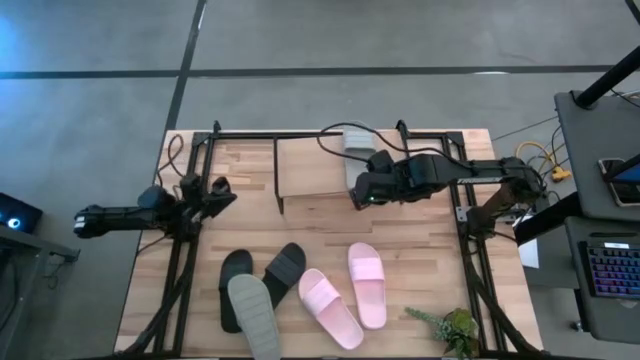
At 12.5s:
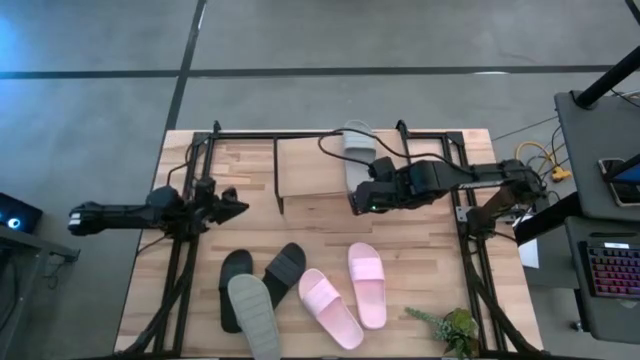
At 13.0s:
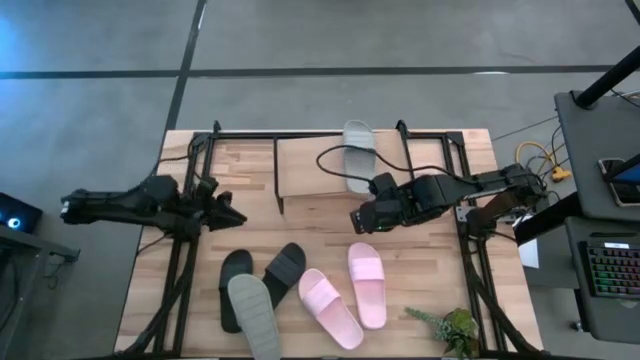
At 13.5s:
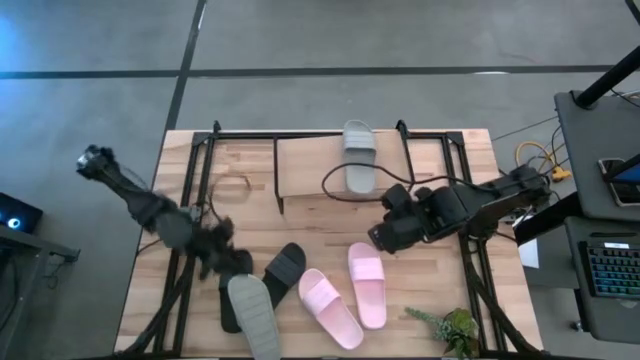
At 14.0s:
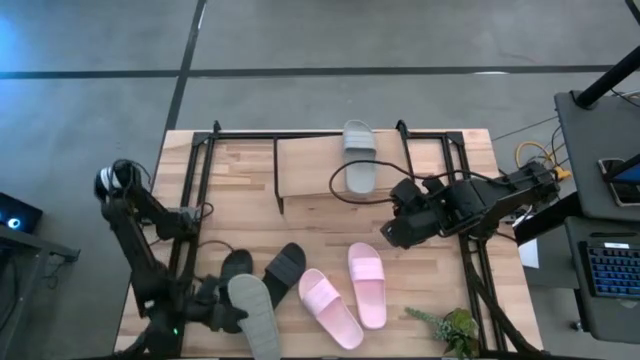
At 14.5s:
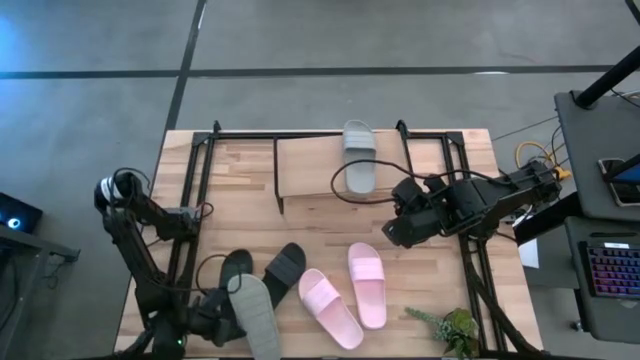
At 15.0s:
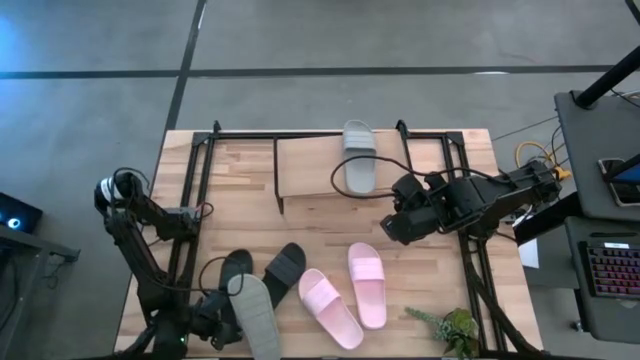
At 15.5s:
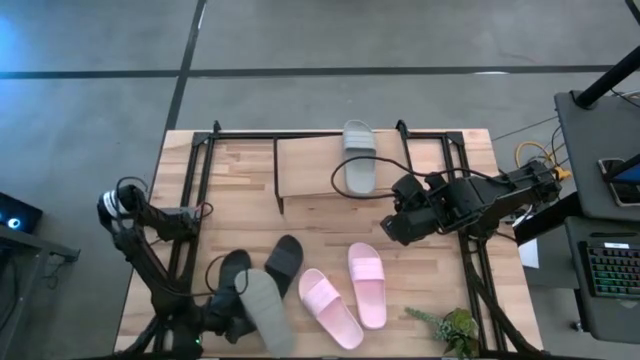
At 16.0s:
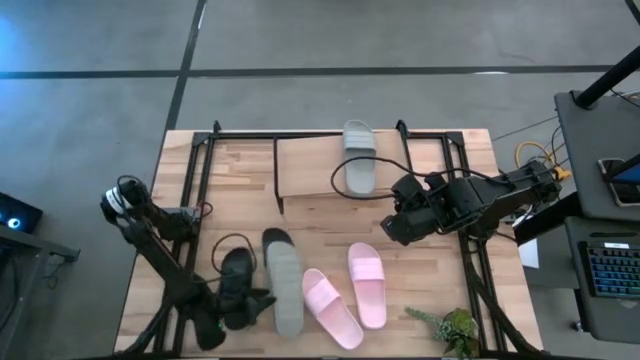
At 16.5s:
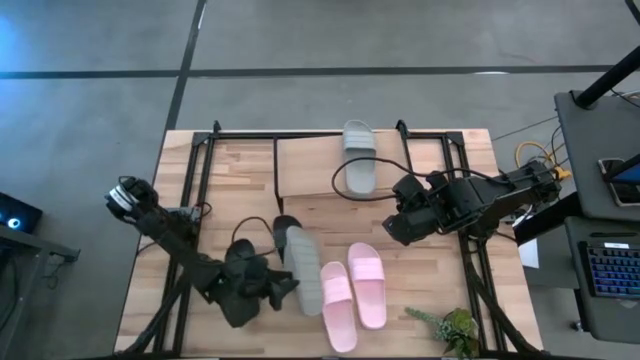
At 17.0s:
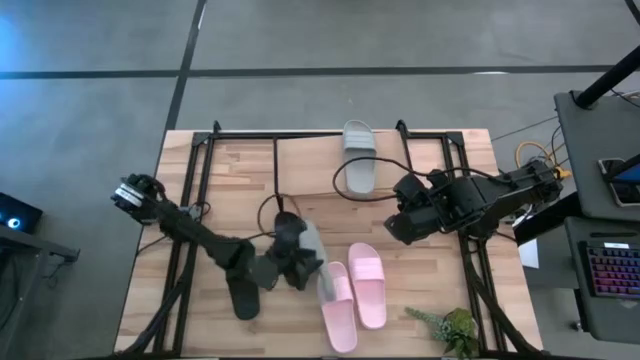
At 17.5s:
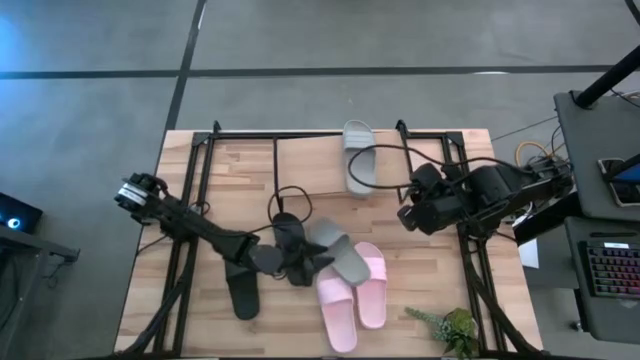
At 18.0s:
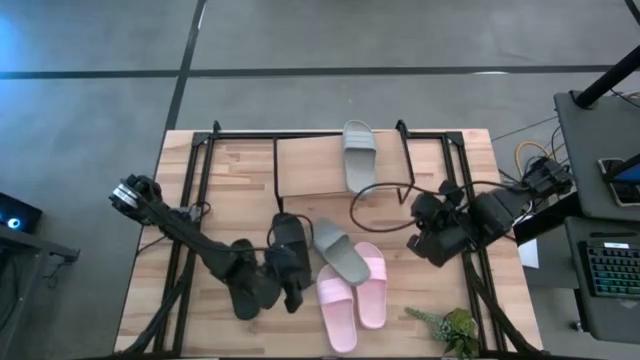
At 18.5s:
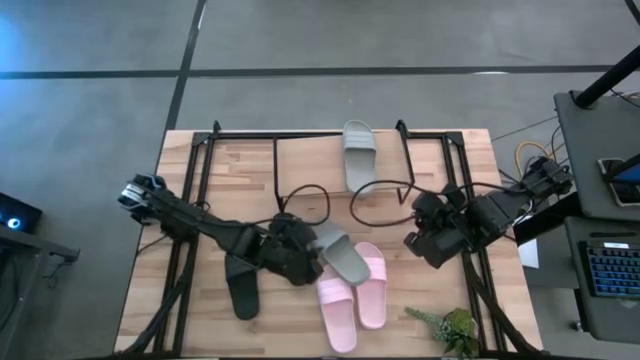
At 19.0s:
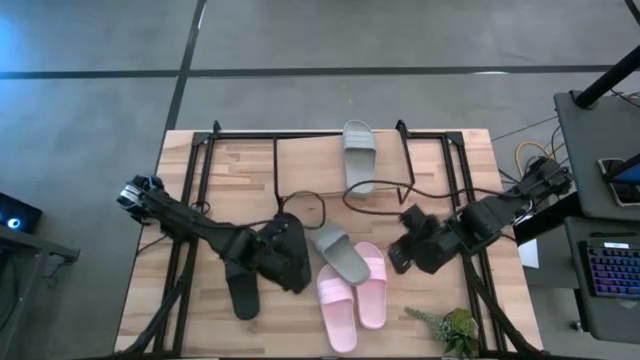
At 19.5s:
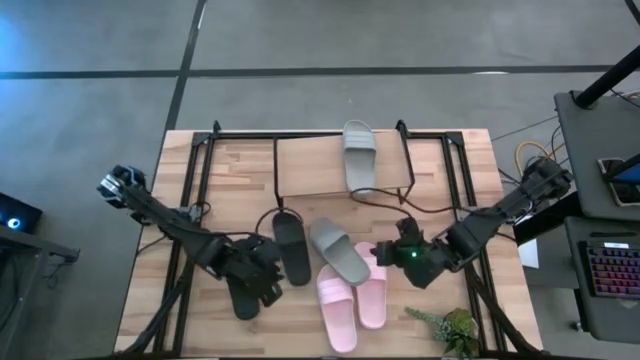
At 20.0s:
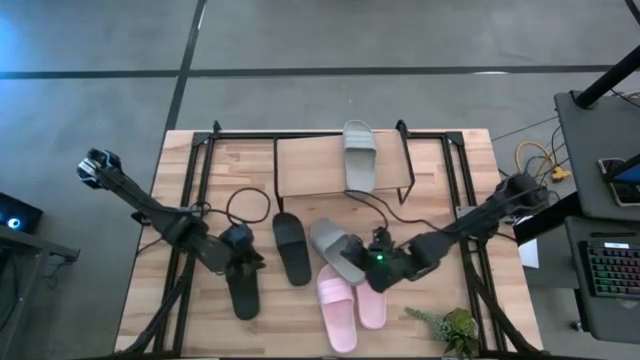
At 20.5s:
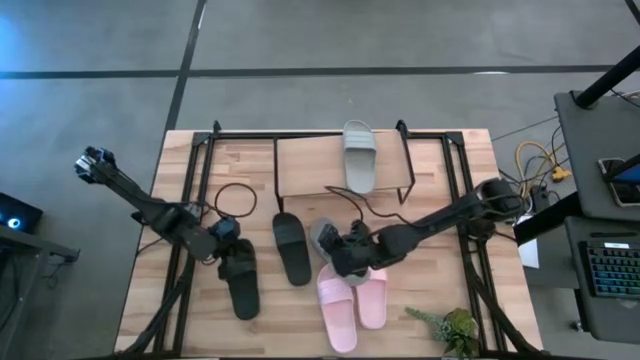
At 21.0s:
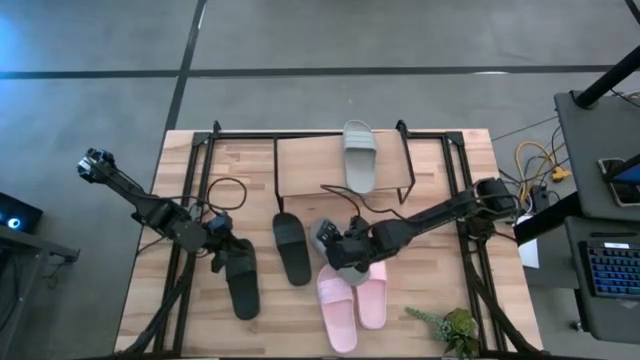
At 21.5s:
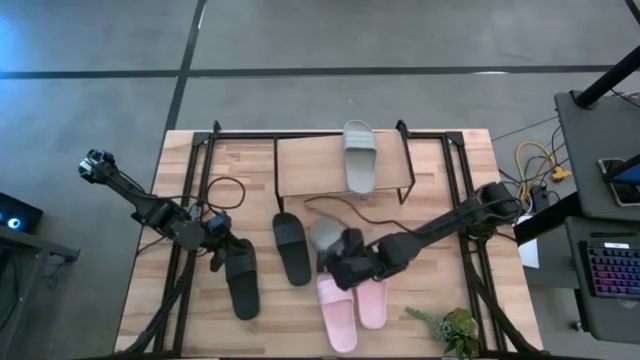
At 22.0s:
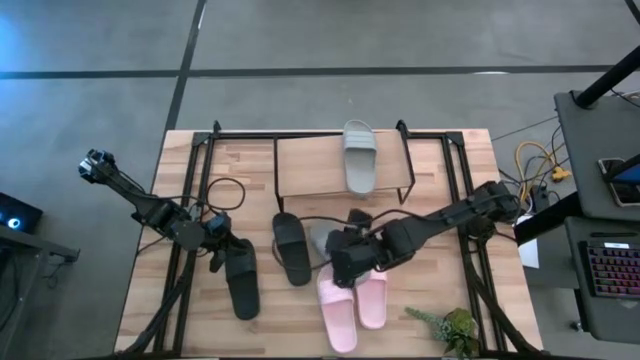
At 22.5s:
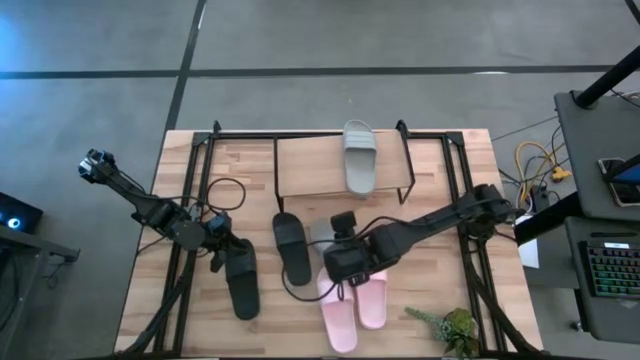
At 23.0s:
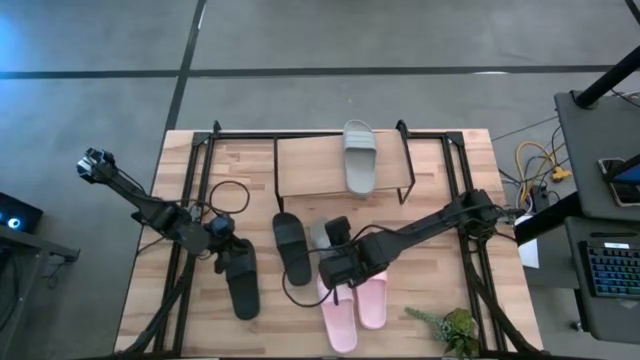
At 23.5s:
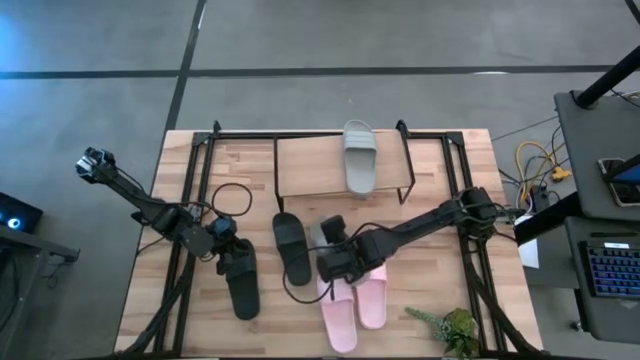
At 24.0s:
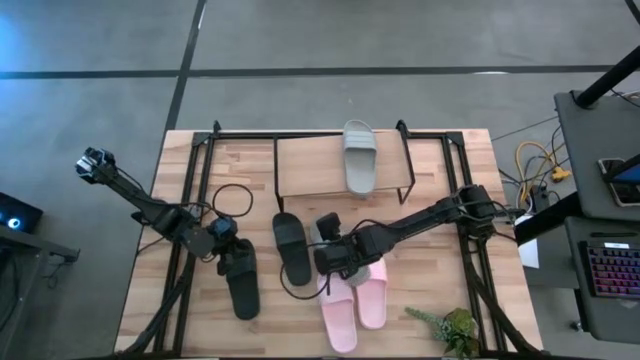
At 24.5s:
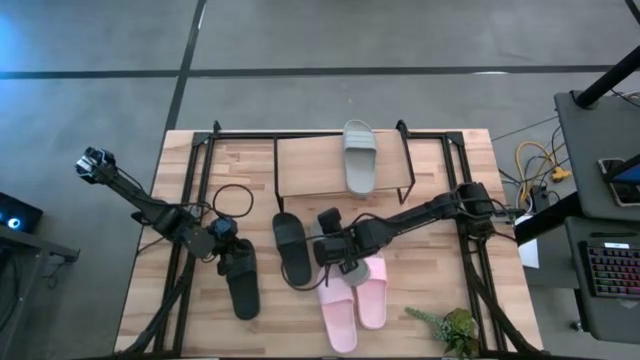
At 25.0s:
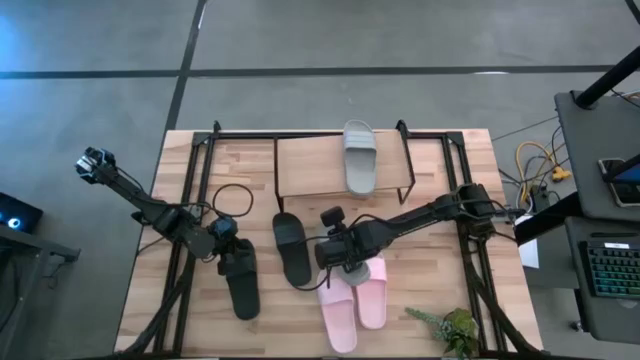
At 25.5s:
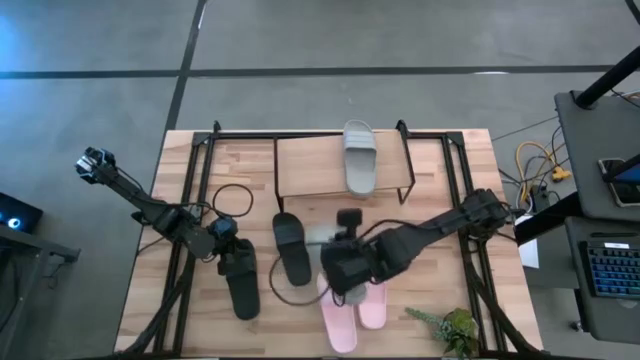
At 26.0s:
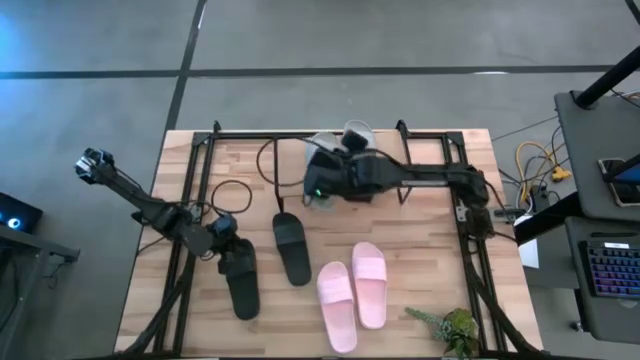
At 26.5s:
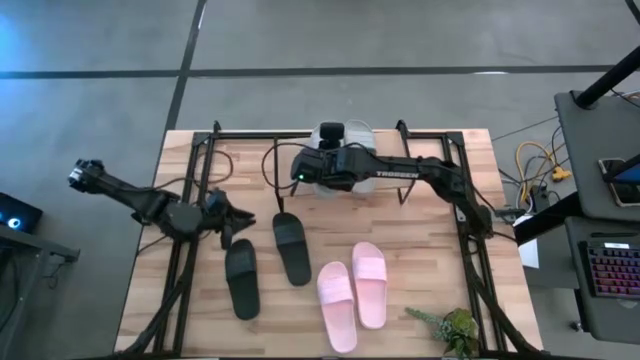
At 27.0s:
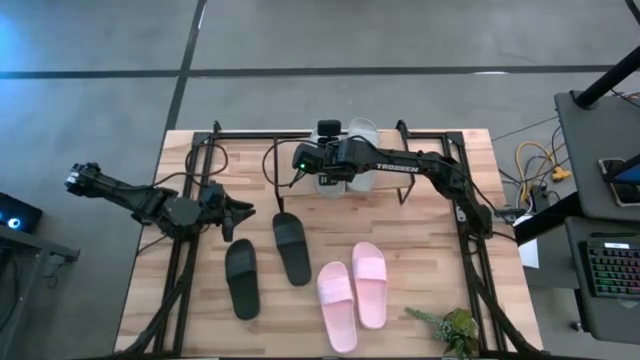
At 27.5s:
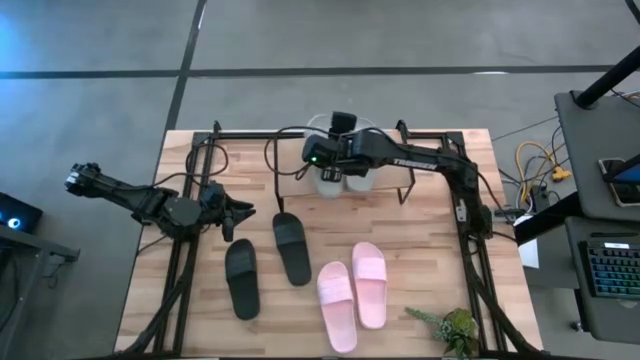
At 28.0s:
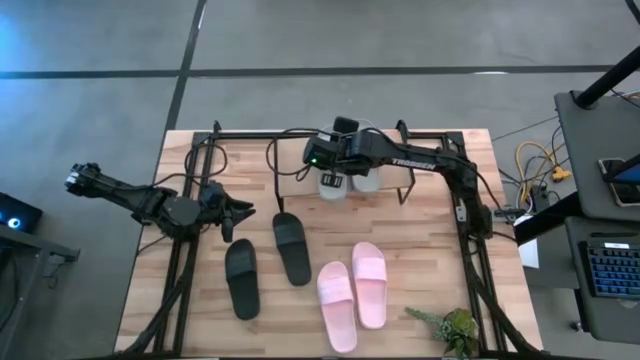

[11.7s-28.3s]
Task: Pick and place slides into the shelf
Put the gray slide on the shelf

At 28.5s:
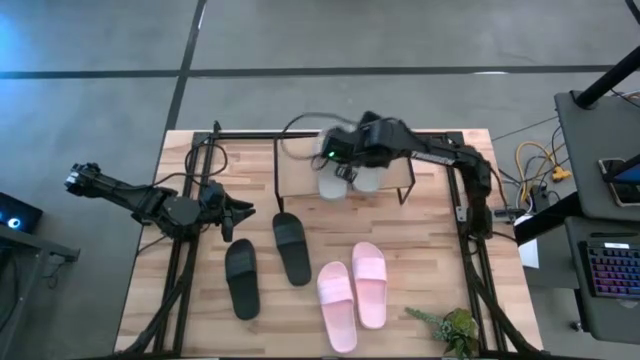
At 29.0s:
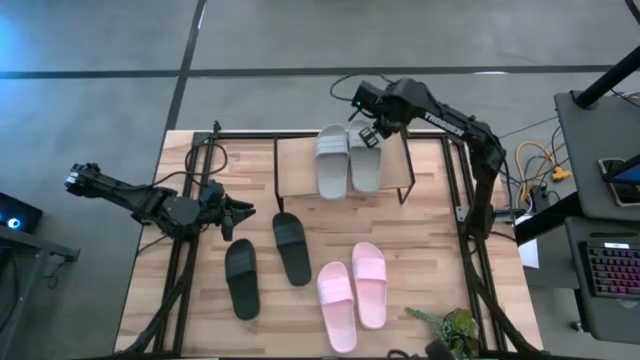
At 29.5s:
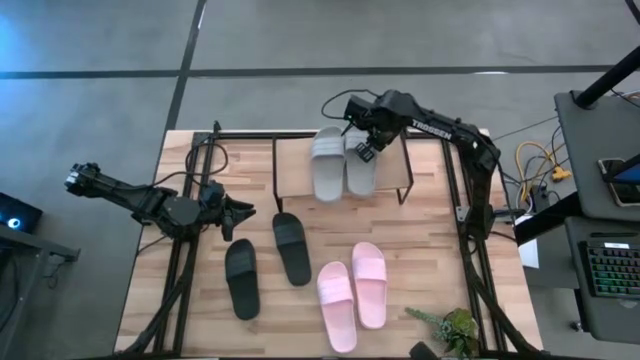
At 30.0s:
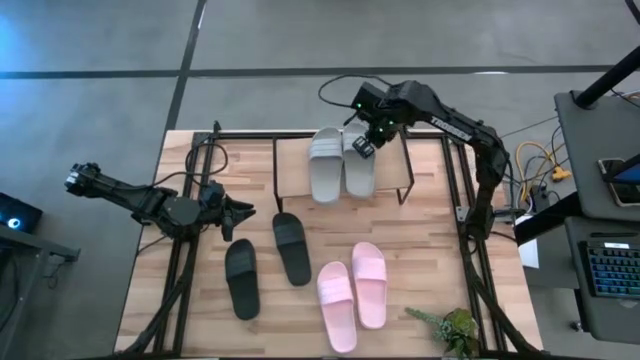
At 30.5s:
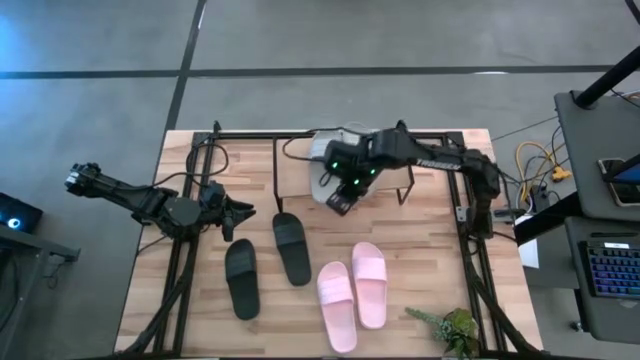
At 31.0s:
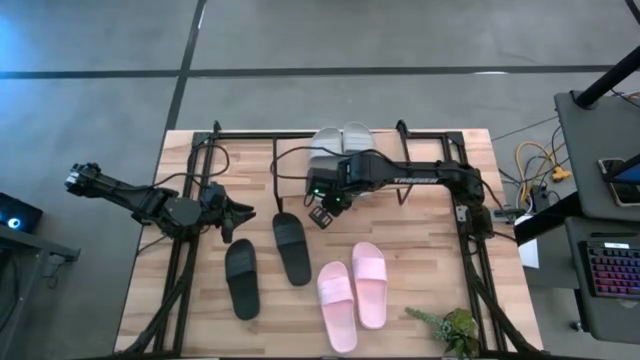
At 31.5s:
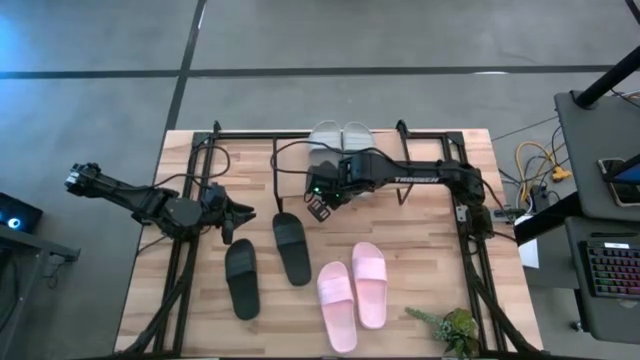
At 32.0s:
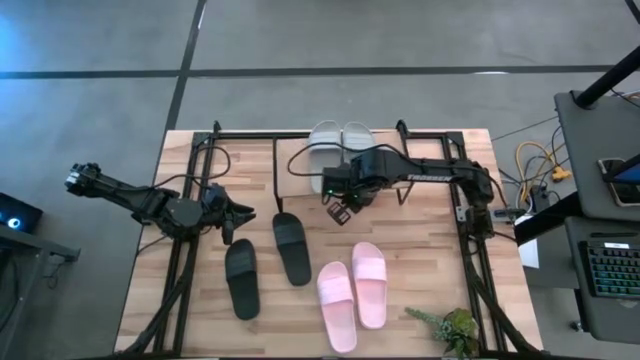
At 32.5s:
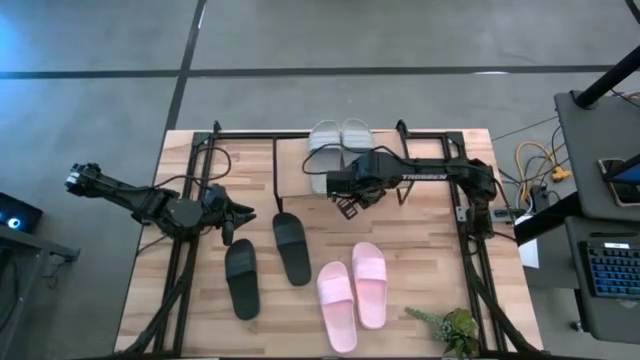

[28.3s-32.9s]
Adjust the gray slides on the shelf
